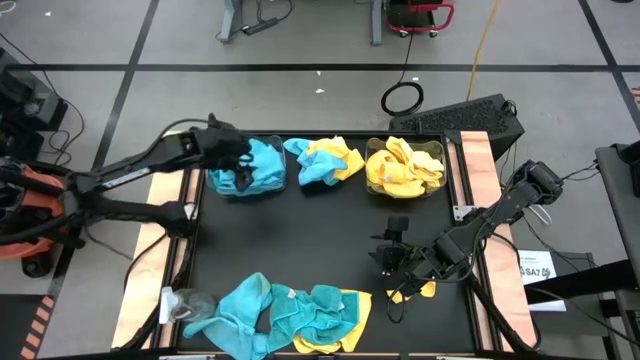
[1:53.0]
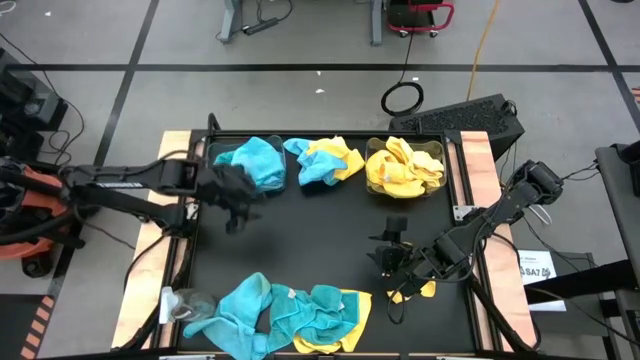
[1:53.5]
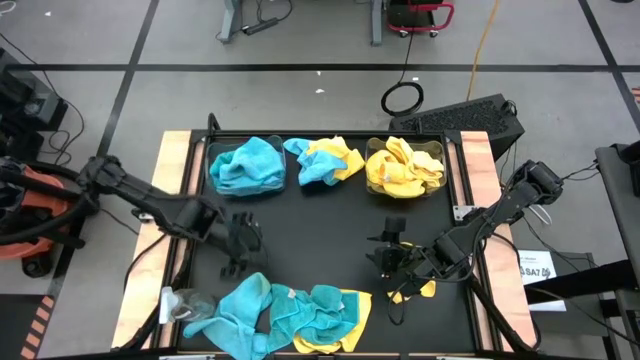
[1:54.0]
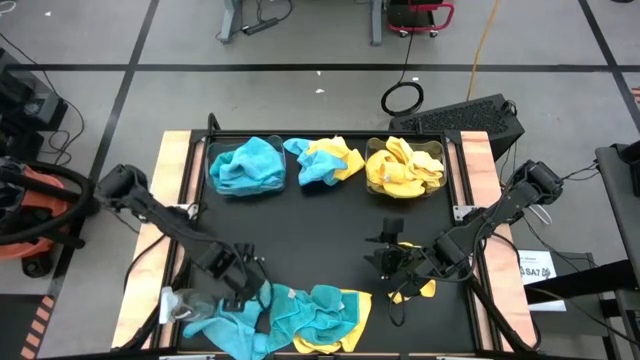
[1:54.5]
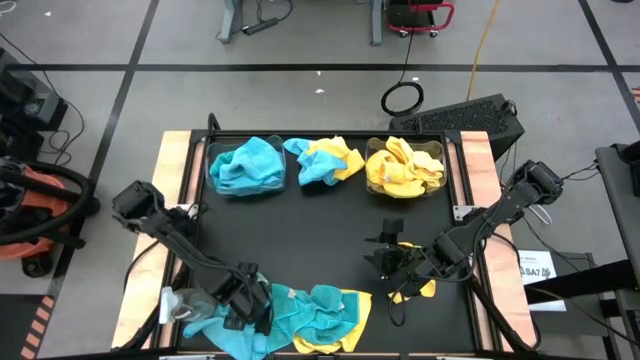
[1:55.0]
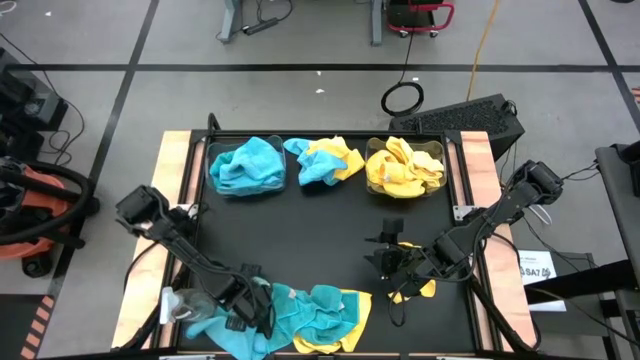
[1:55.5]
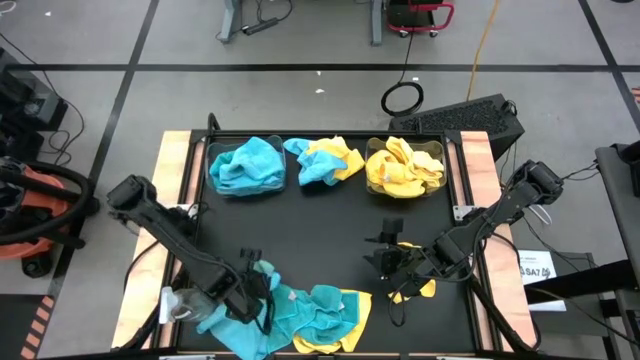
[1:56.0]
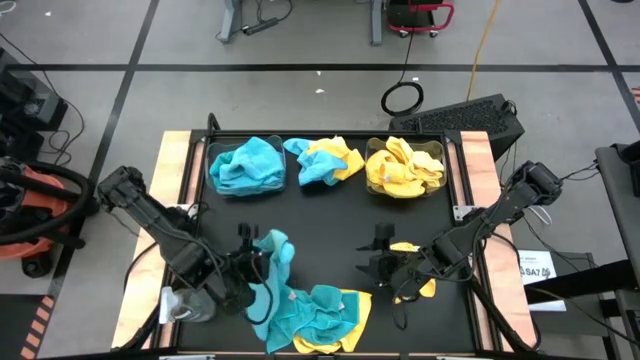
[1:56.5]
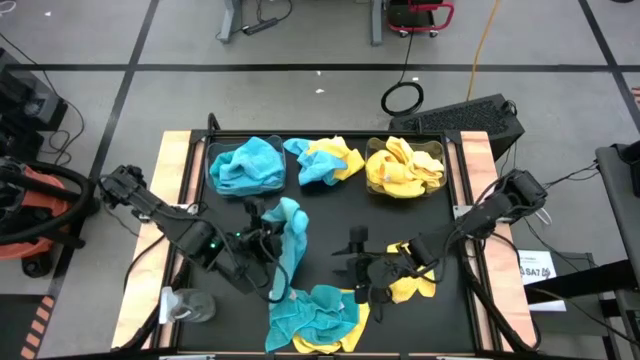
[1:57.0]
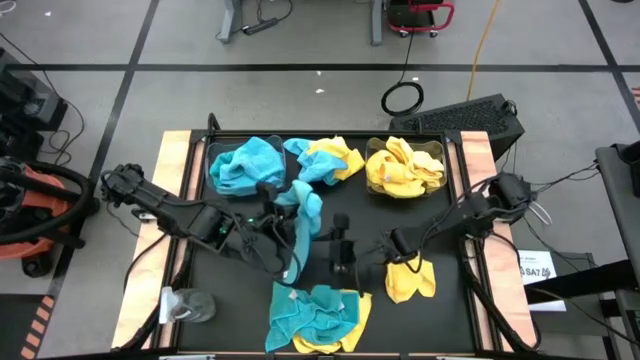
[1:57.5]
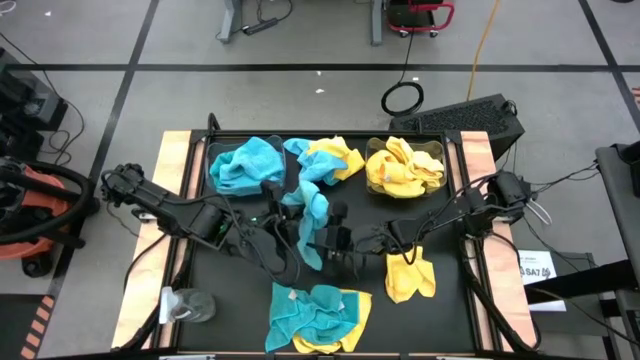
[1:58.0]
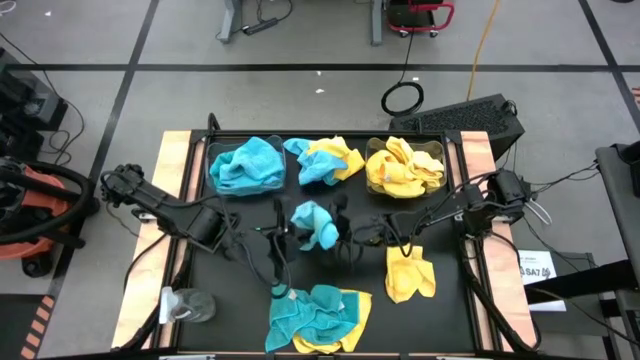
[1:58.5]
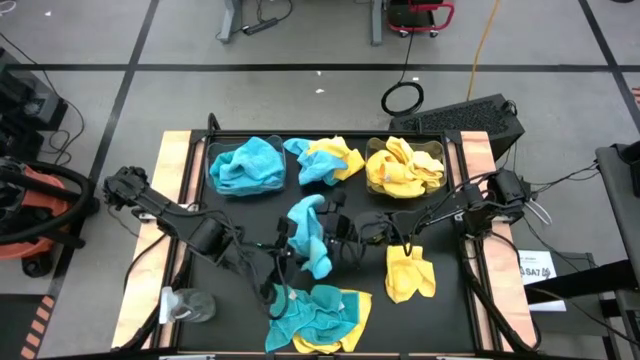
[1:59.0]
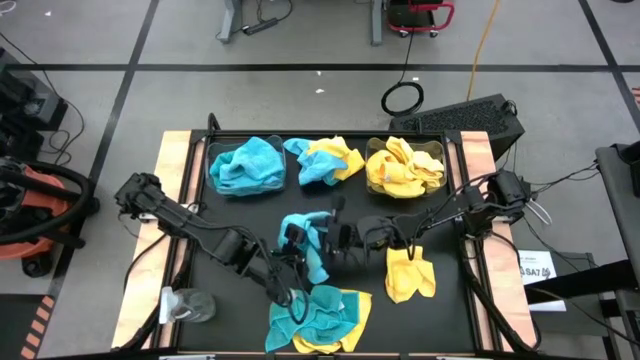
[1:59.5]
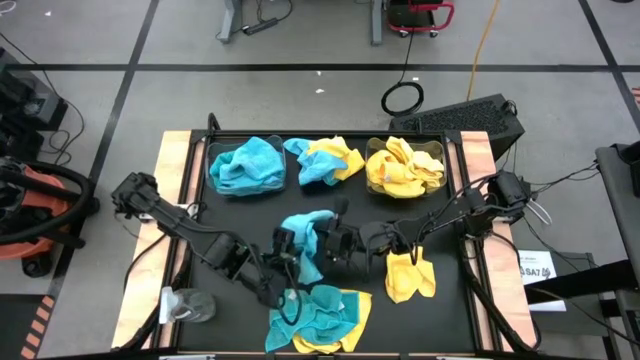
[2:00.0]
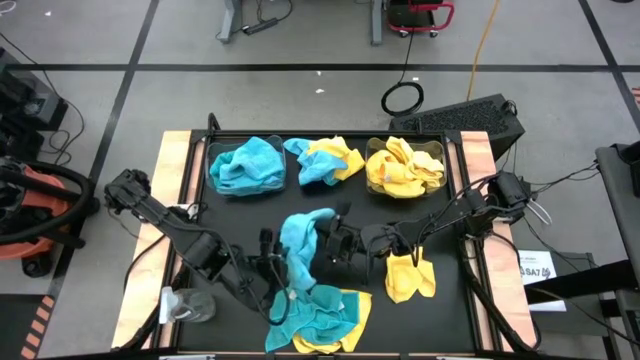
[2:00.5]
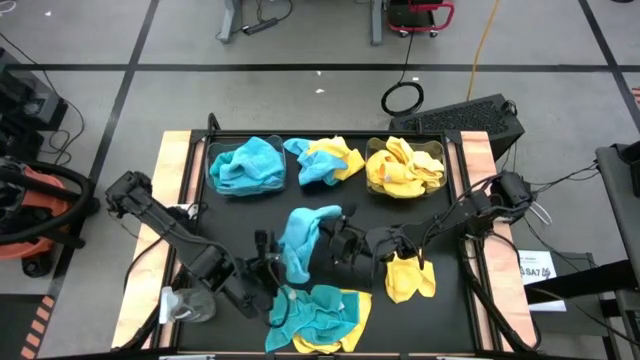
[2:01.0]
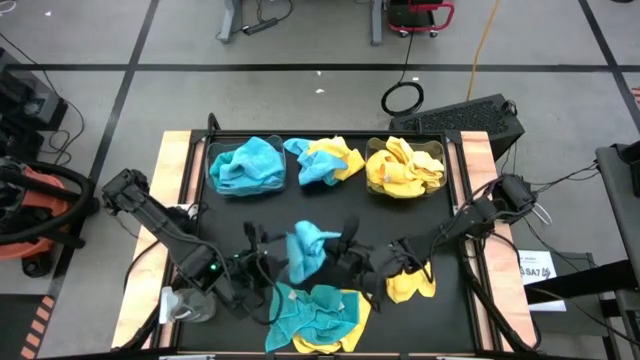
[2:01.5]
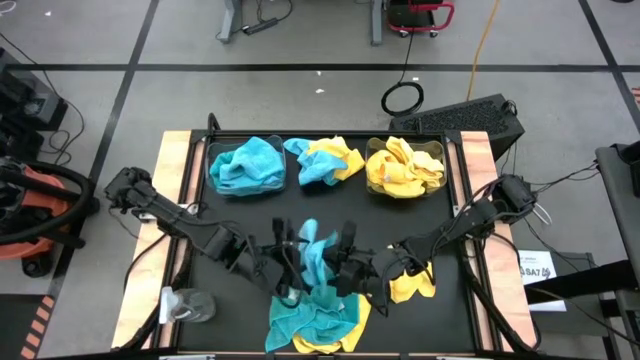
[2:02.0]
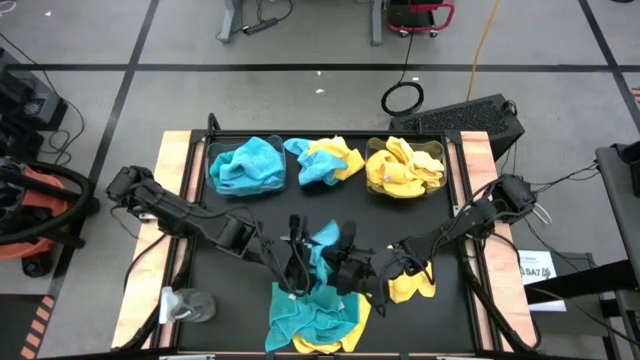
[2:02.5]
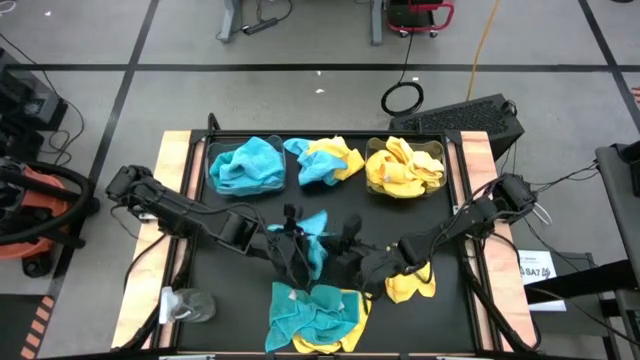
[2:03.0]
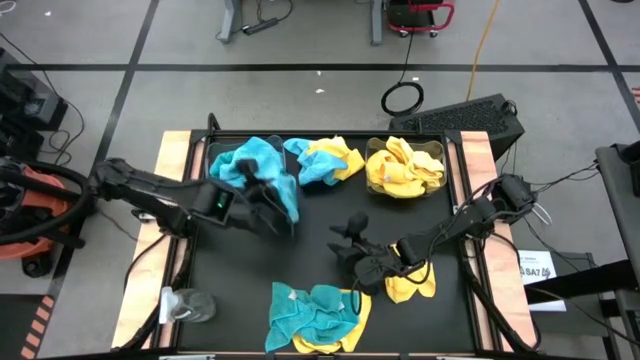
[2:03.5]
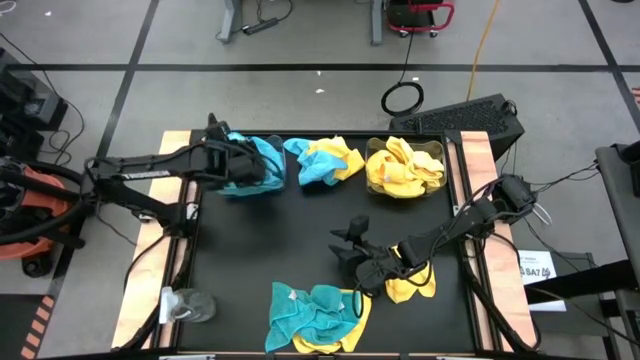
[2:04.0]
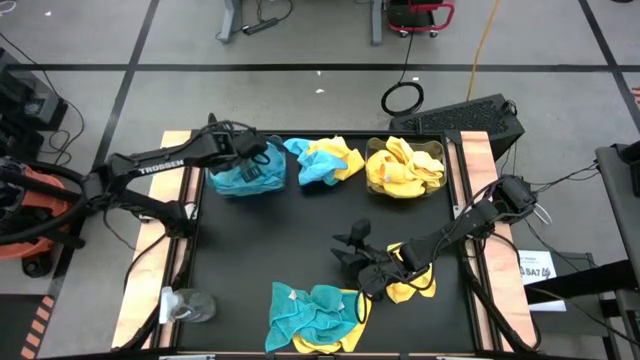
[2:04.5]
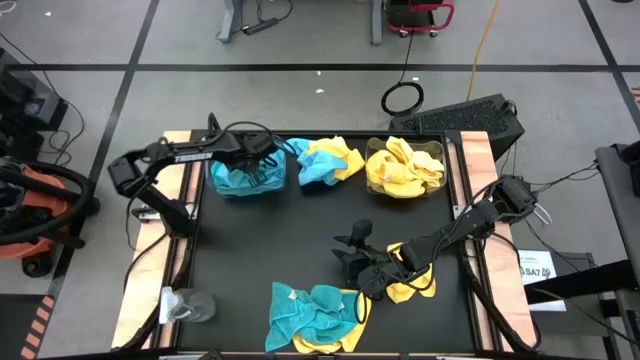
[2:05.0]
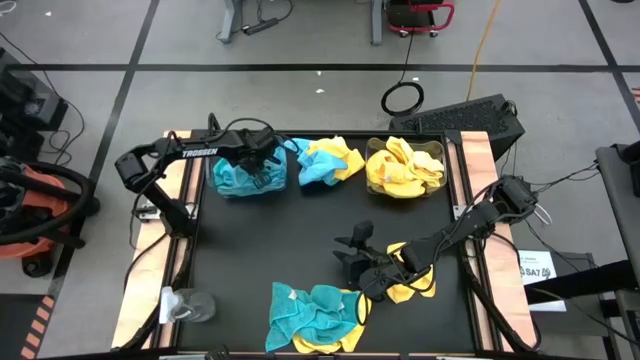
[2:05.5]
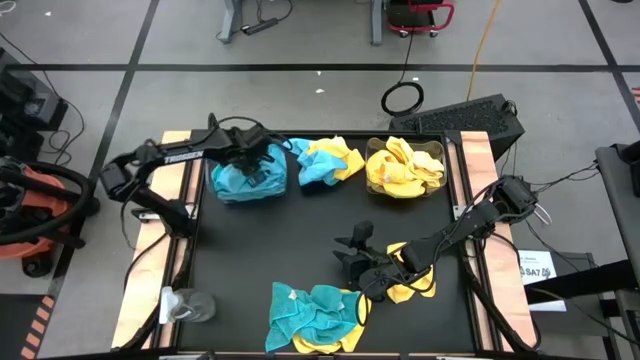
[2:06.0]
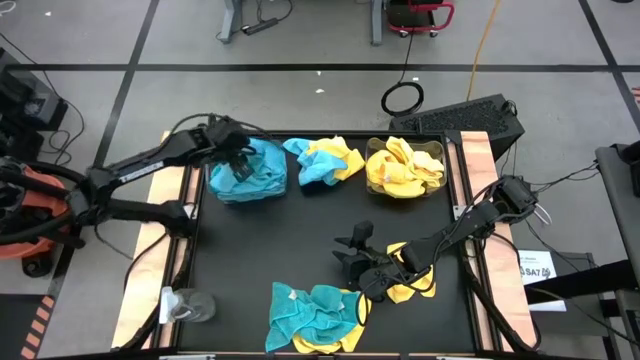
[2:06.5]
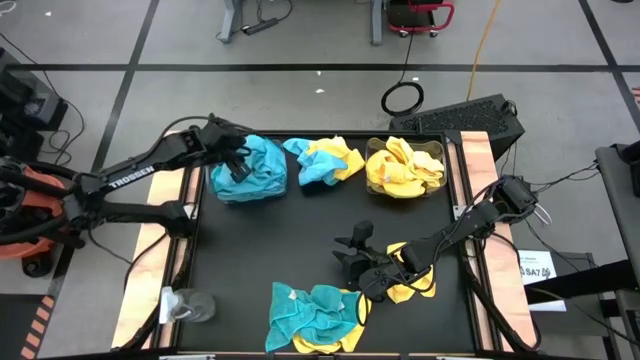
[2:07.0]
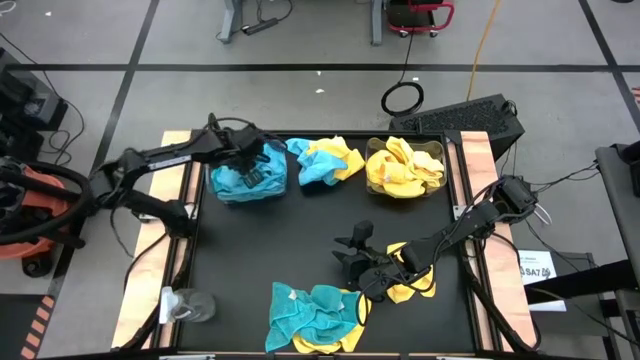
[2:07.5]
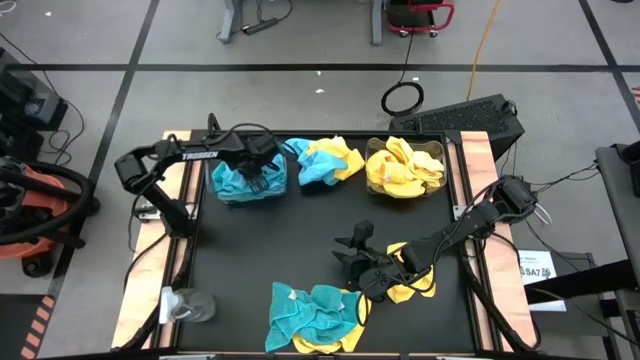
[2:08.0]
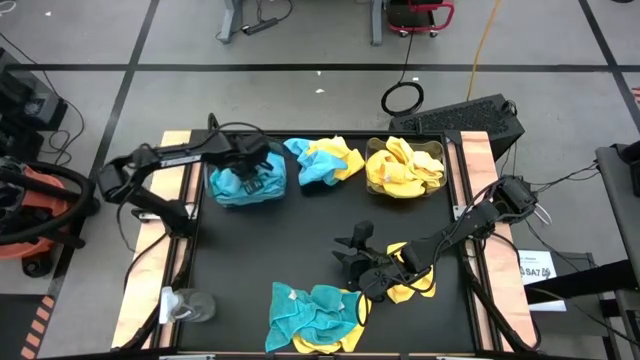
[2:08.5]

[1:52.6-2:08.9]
Task: Sort microfiber towel by color & place in baskets
Put the blue microfiber cloth into the left transparent bin

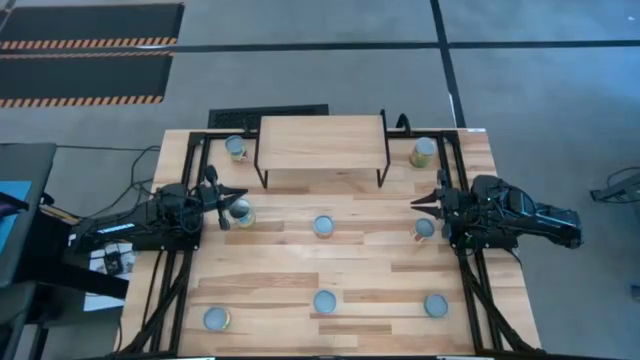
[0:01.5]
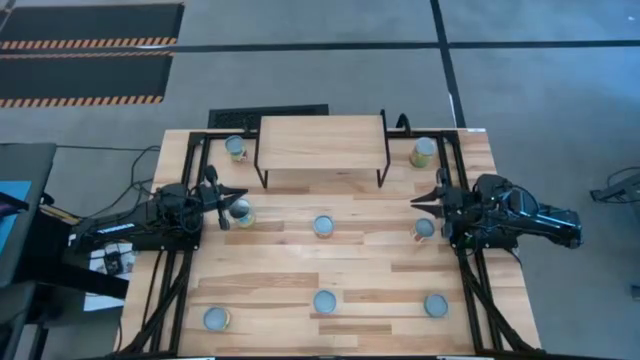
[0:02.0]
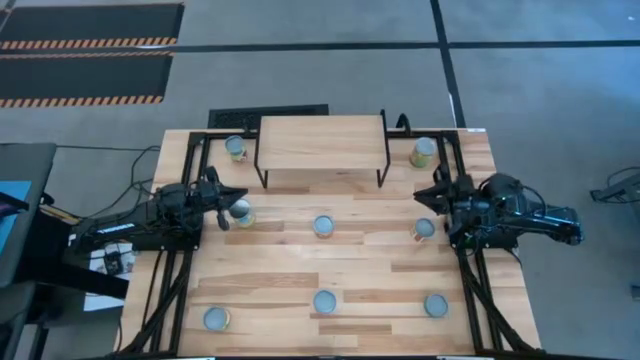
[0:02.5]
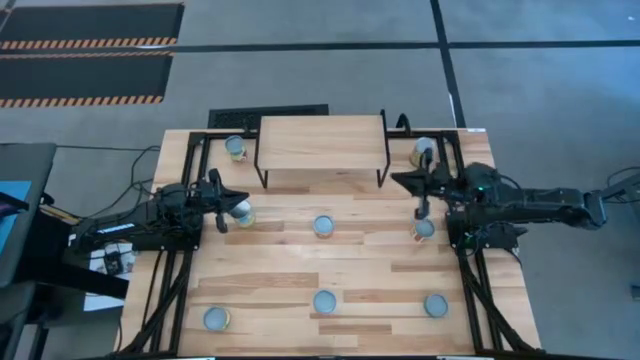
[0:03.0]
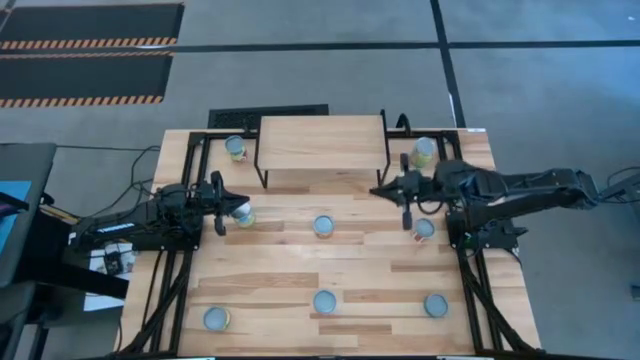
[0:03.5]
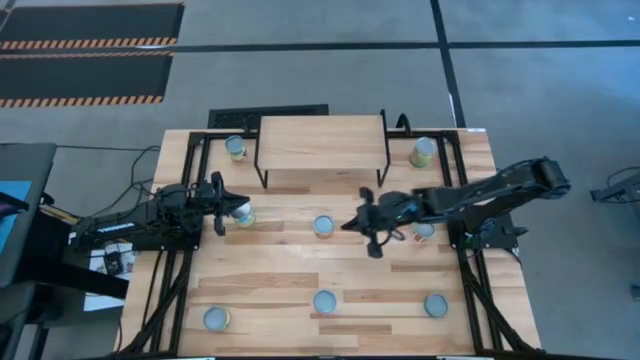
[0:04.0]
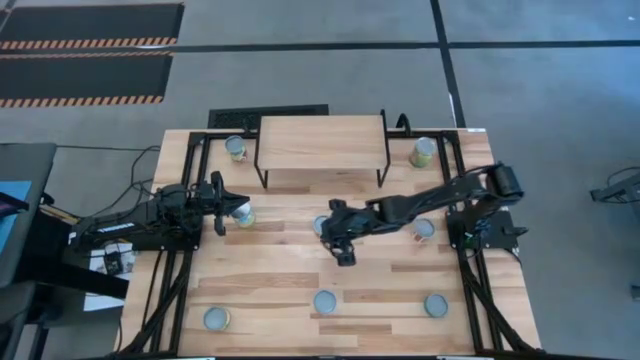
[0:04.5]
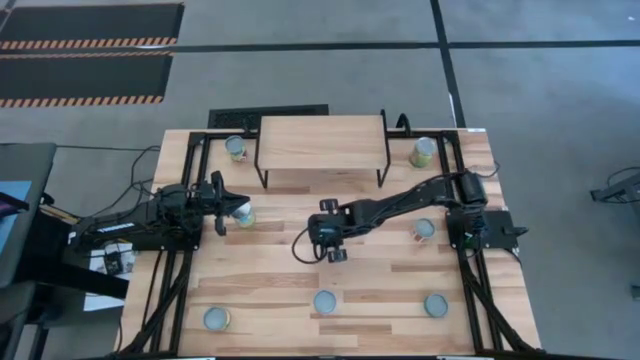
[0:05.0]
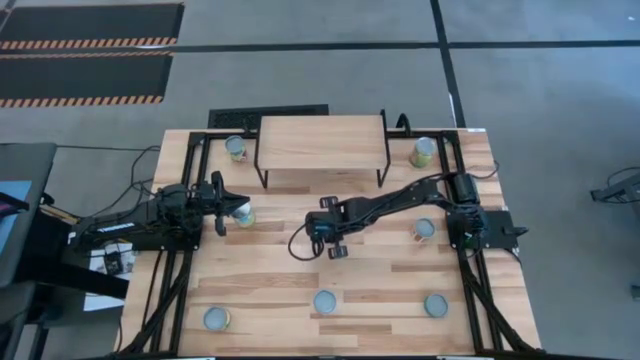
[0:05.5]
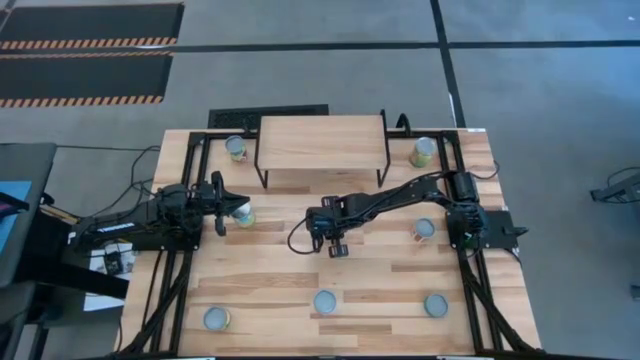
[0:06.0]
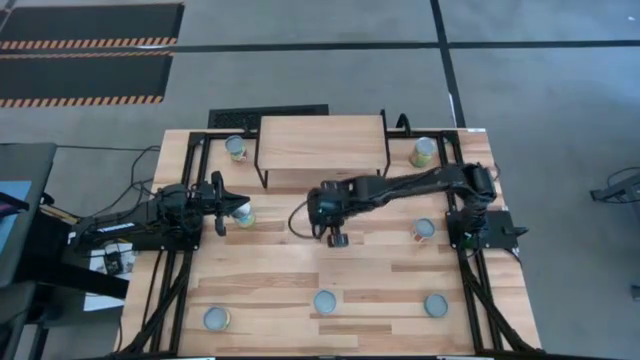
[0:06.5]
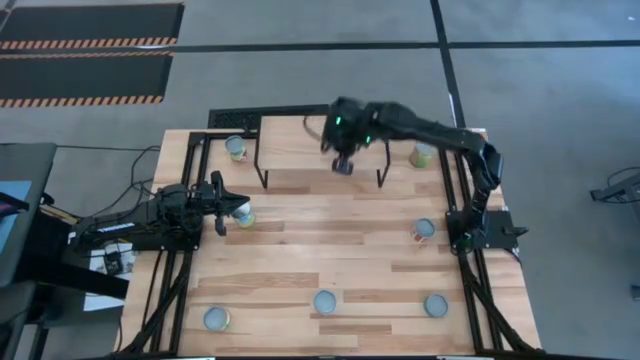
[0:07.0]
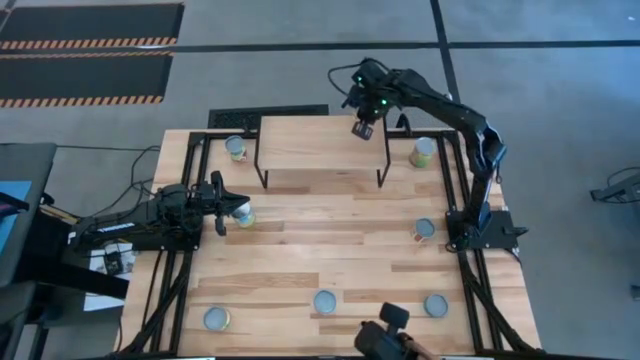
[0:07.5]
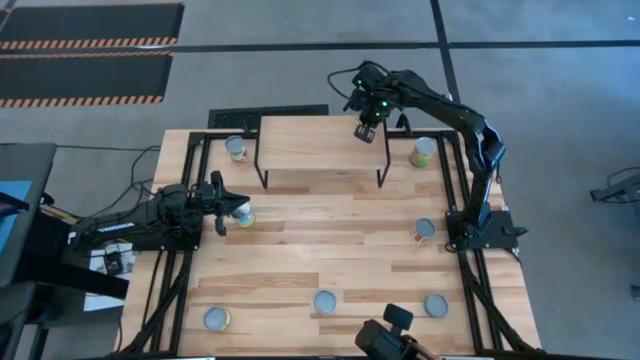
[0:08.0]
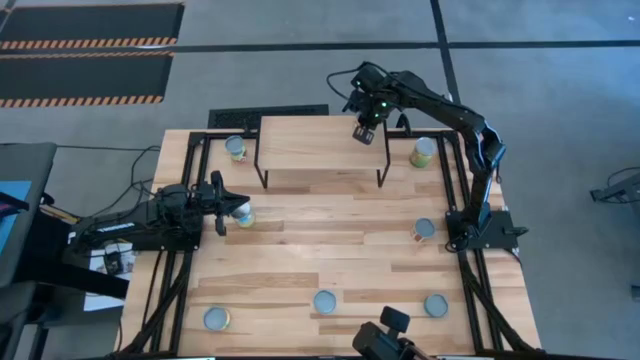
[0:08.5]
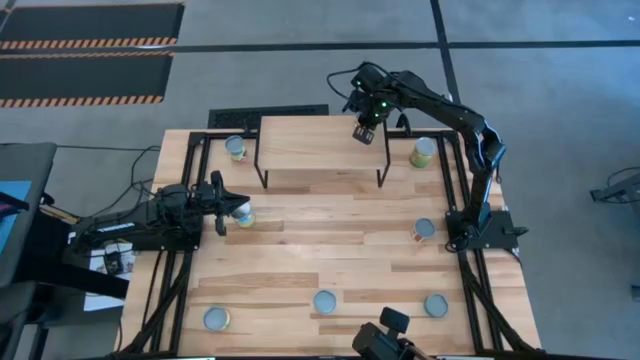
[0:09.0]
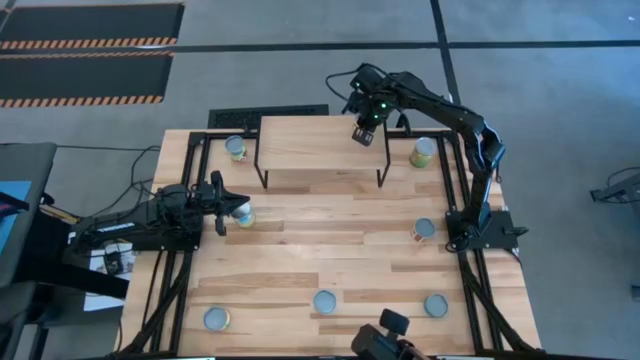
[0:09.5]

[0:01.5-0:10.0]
Task: Pick and place cans onto a shelf
Put the canned mushrooms on the shelf
